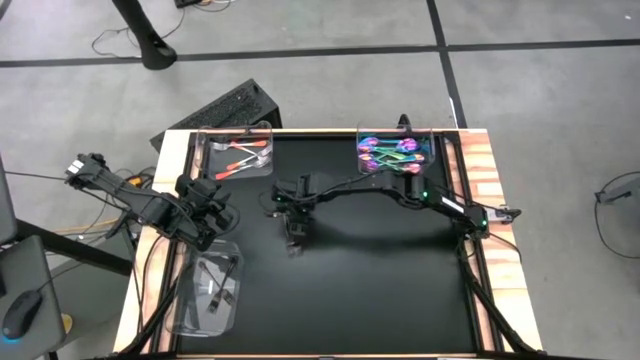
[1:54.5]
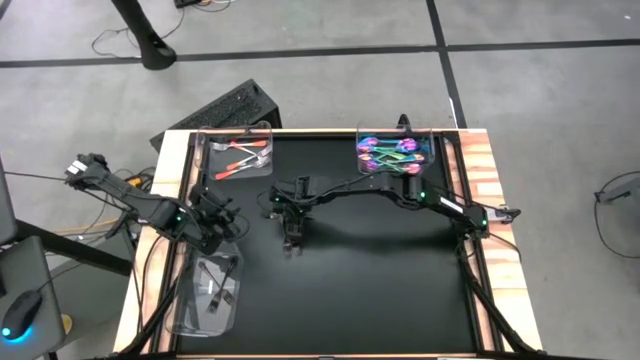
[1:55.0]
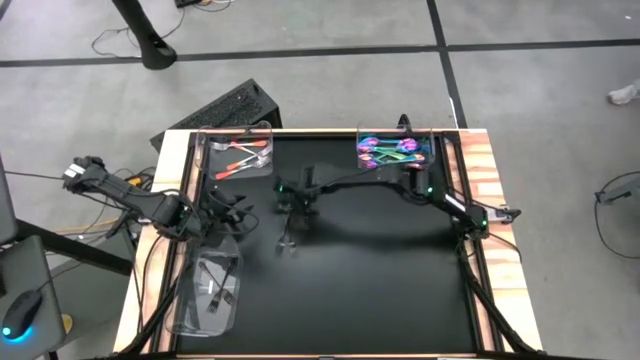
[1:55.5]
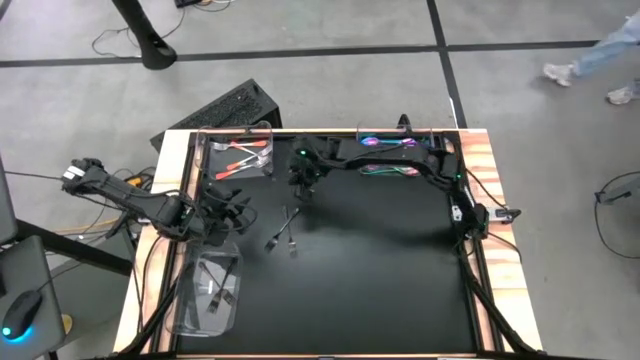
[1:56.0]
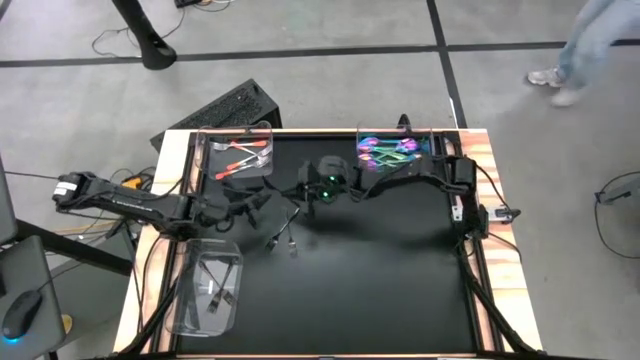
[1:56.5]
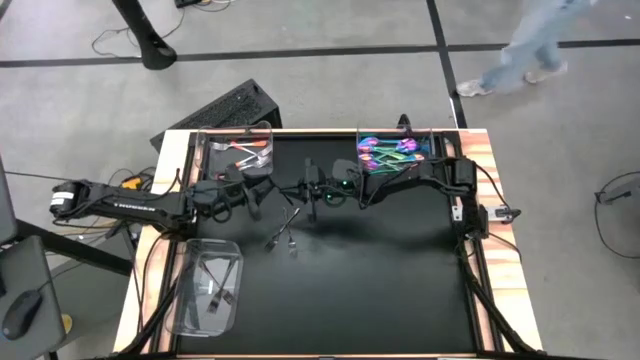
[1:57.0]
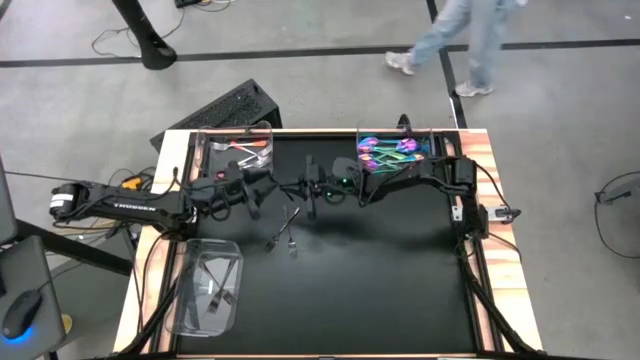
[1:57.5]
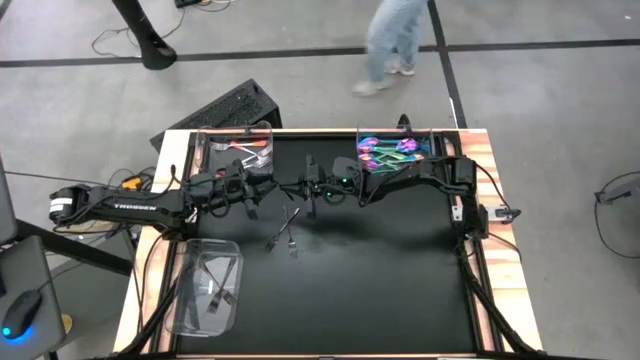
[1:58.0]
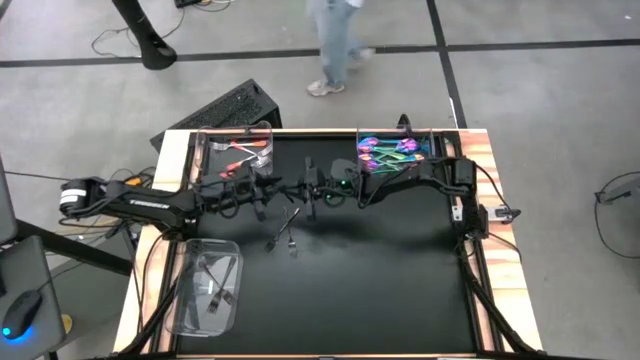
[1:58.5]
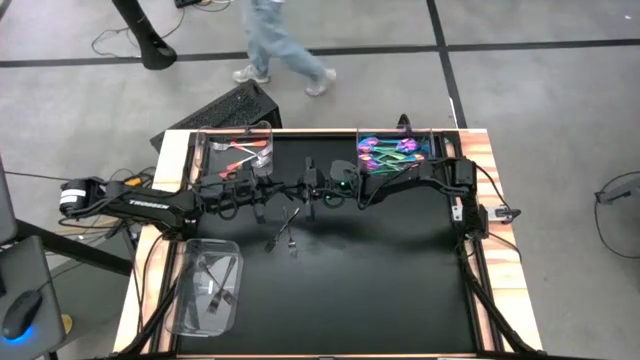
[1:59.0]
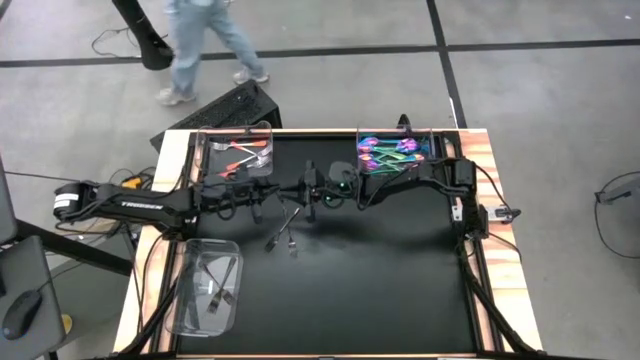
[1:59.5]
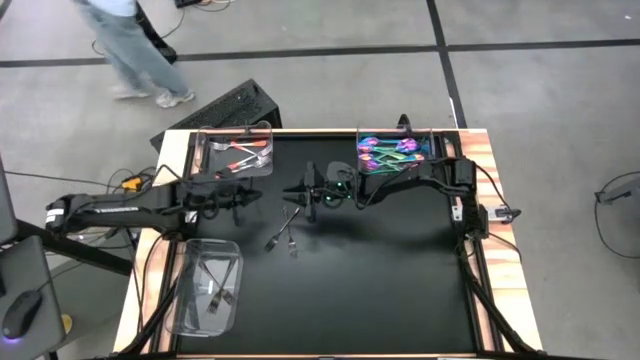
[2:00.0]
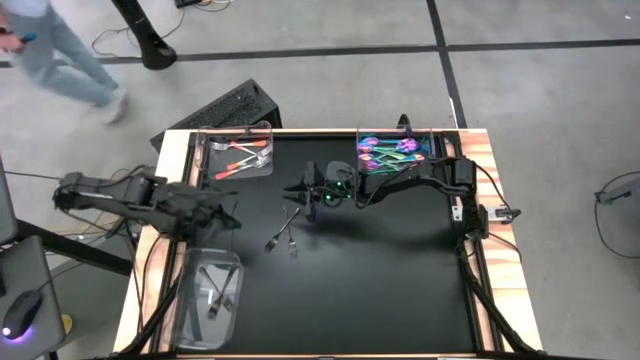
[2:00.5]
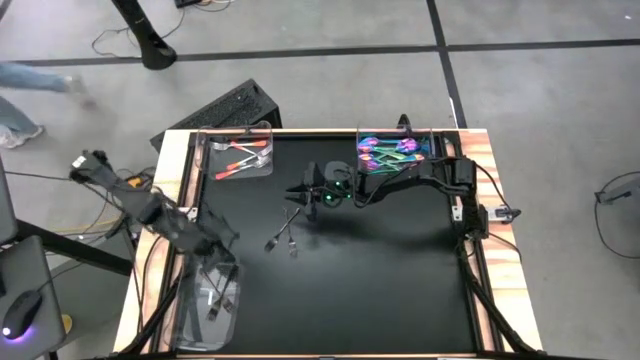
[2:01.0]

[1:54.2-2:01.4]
Task: Sort silverware by color (type)
Put the black fork into bottom transparent bin

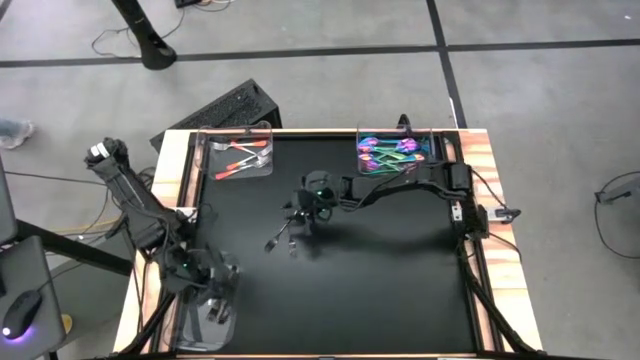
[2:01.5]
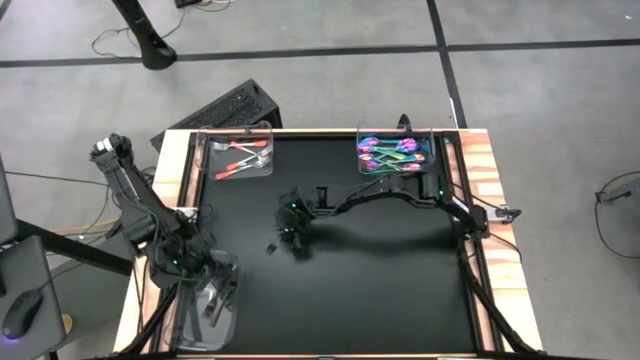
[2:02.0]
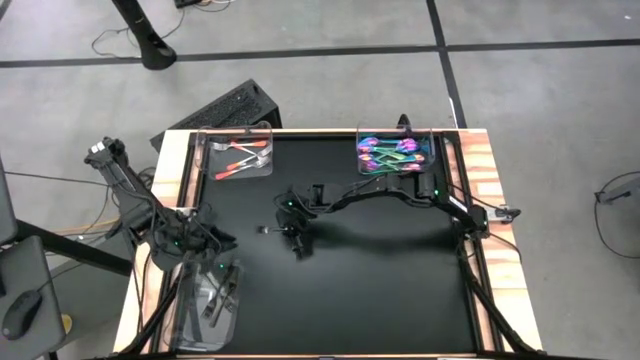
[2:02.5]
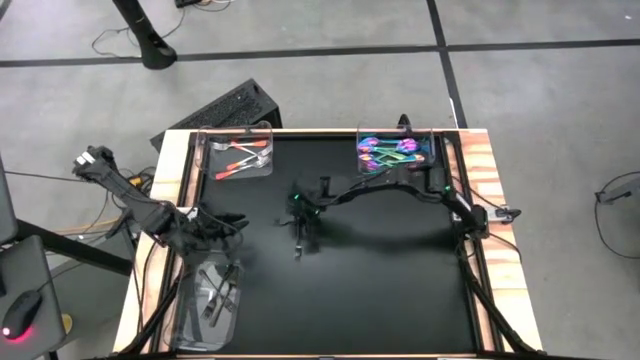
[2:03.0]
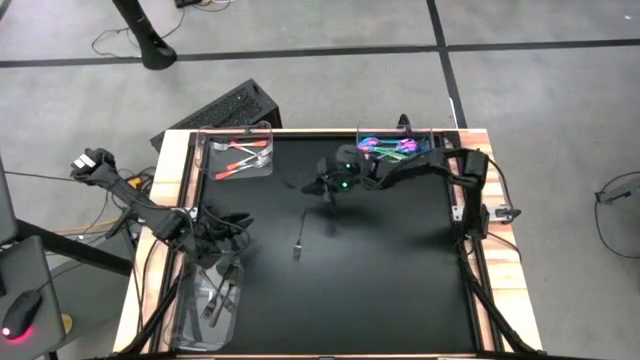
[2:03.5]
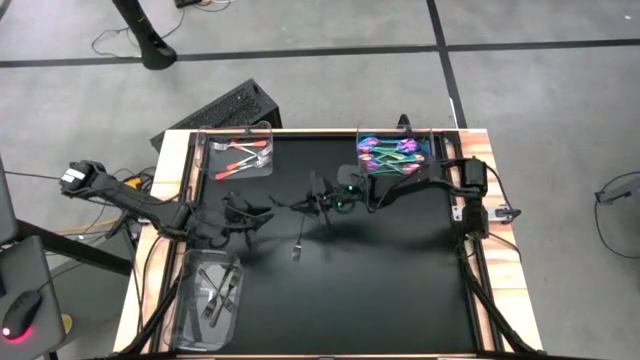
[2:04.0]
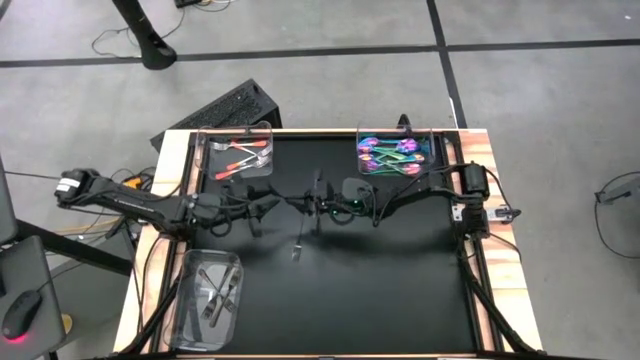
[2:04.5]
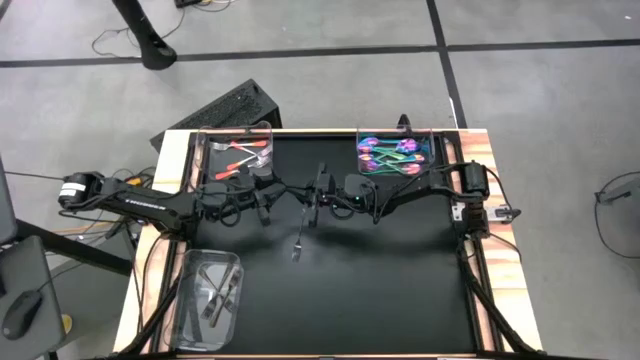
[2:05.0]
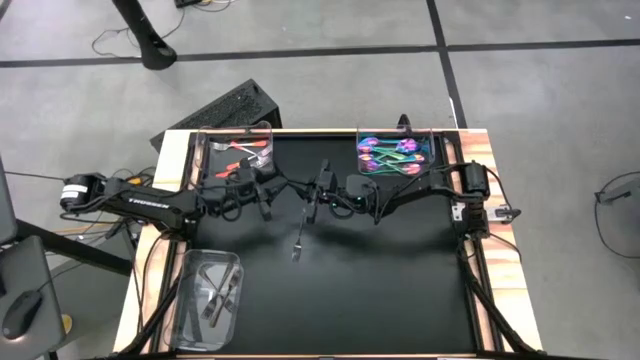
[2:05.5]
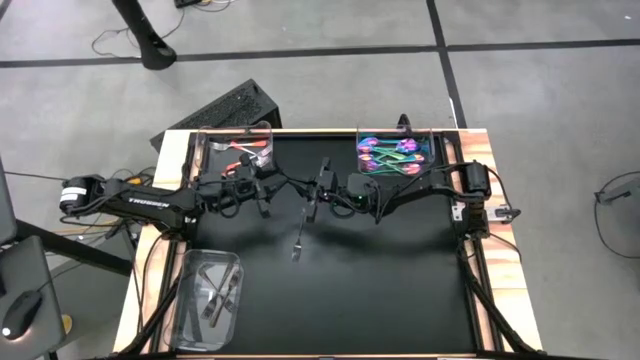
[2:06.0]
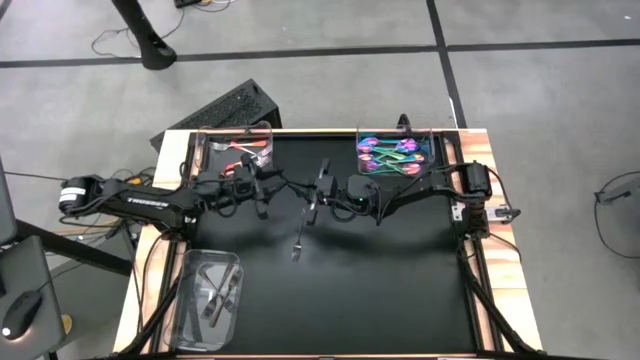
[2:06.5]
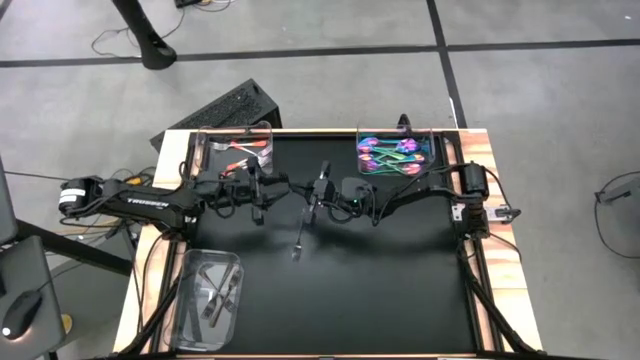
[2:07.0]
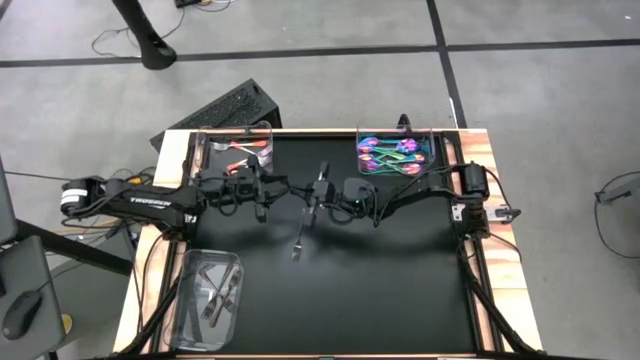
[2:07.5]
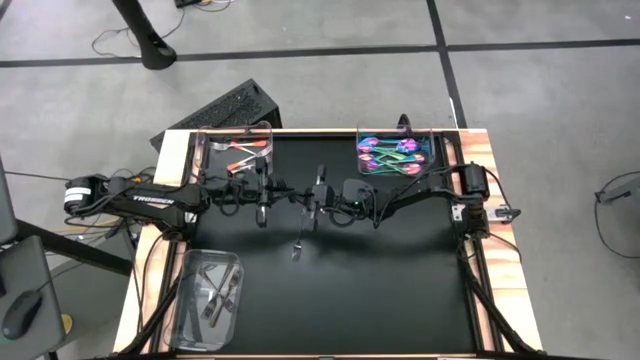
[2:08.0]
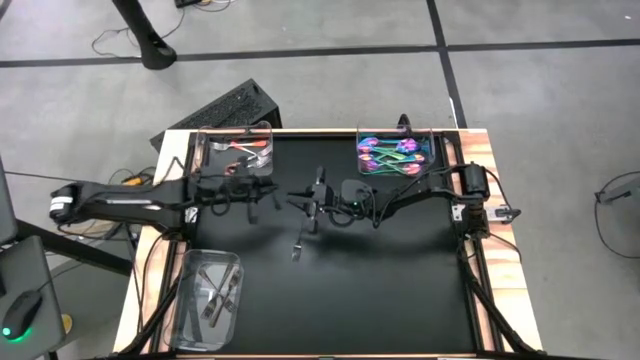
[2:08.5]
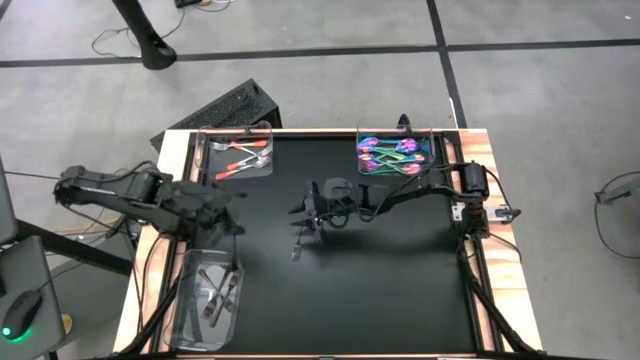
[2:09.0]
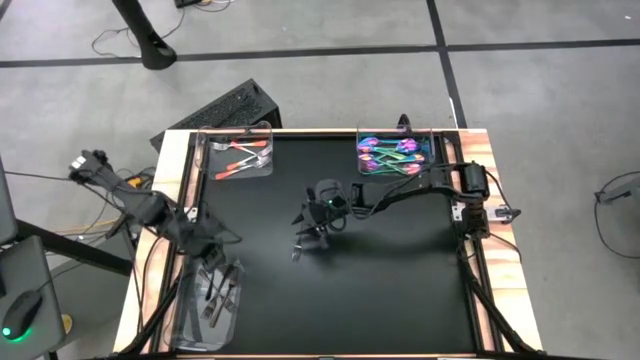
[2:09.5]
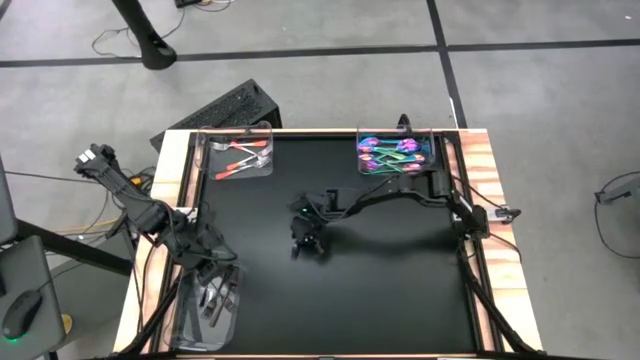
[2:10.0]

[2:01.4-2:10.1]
Put the black fork into bottom transparent bin

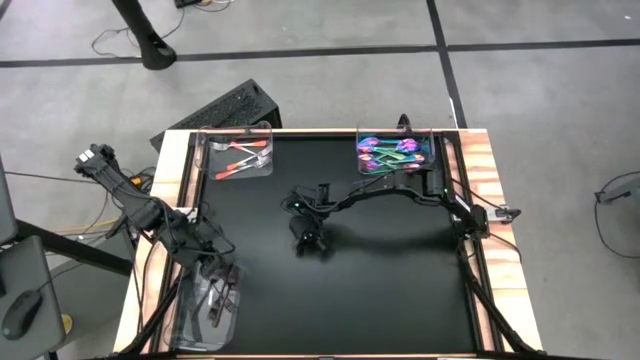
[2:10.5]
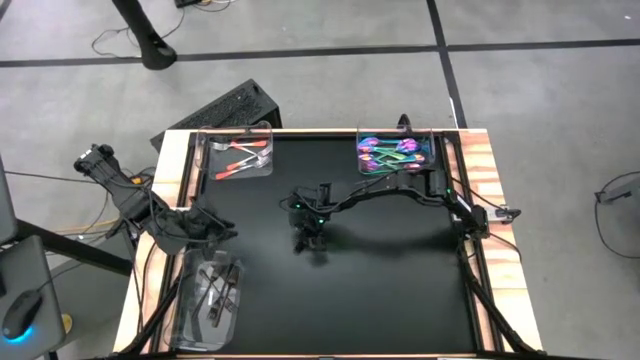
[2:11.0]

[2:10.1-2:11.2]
Put the black fork into bottom transparent bin

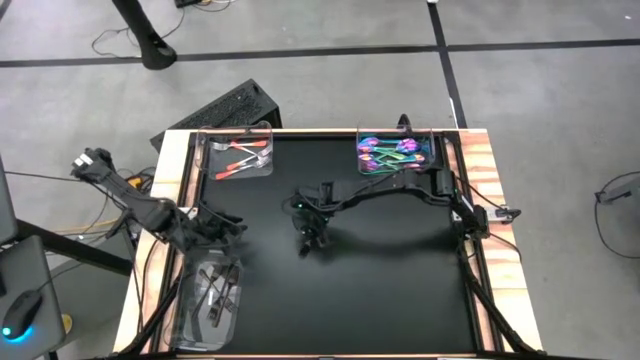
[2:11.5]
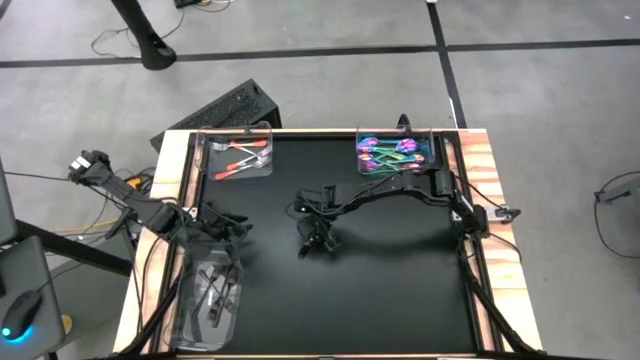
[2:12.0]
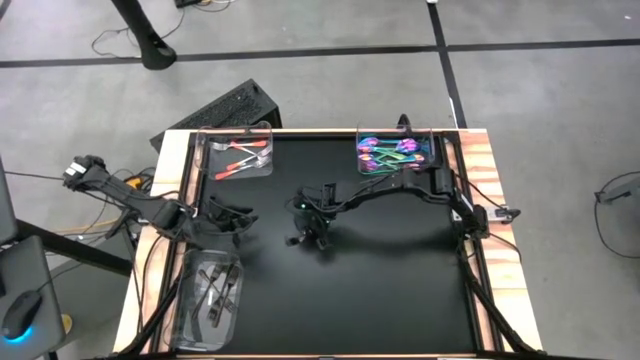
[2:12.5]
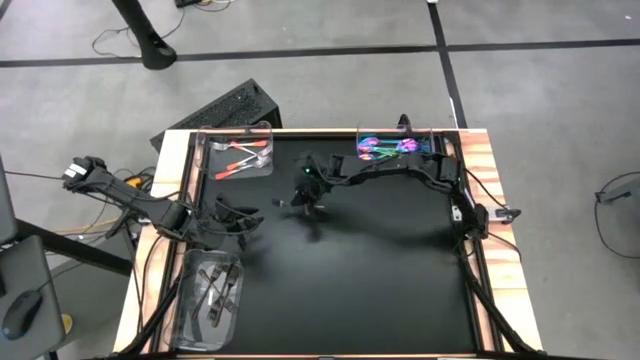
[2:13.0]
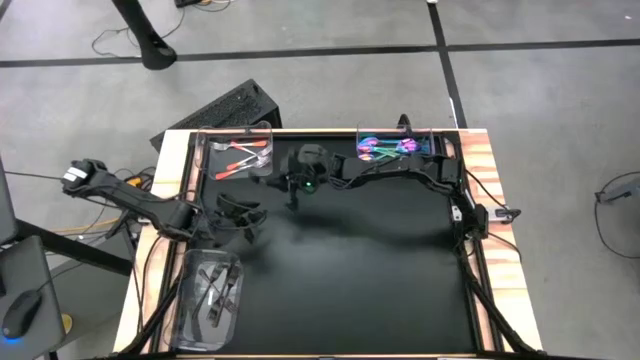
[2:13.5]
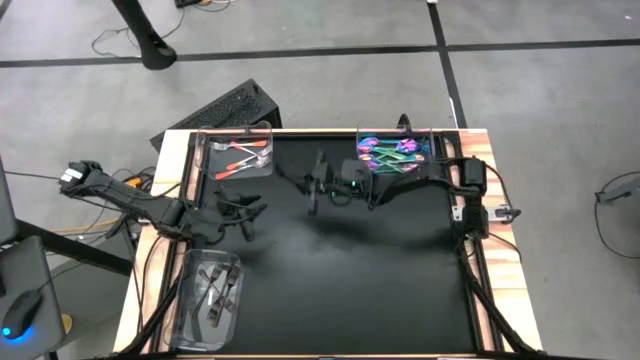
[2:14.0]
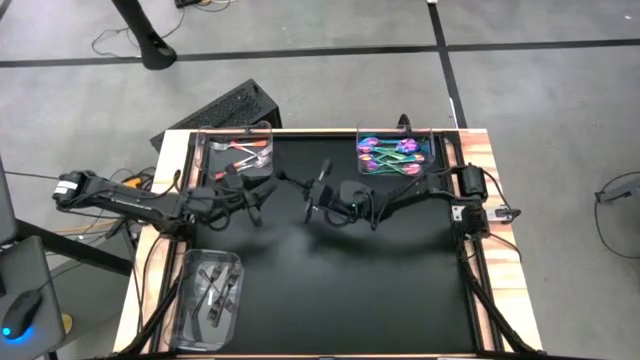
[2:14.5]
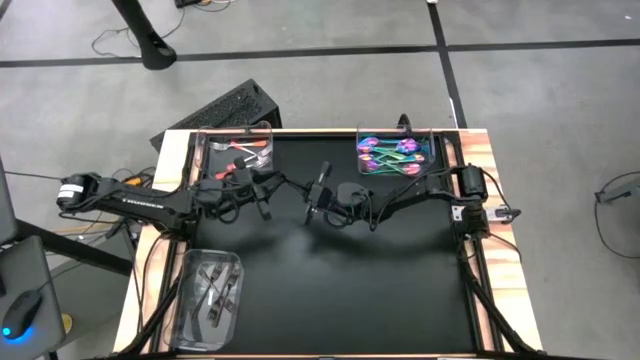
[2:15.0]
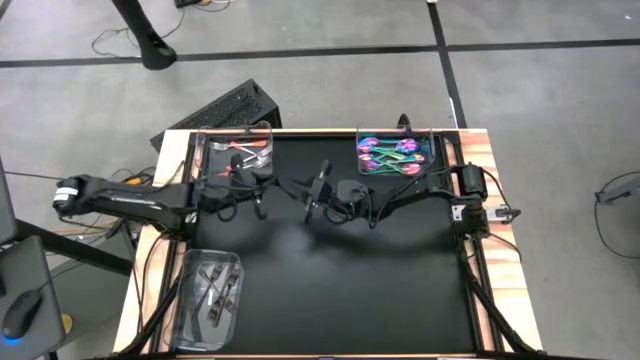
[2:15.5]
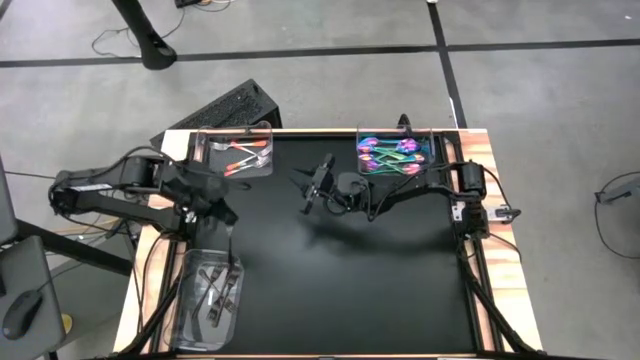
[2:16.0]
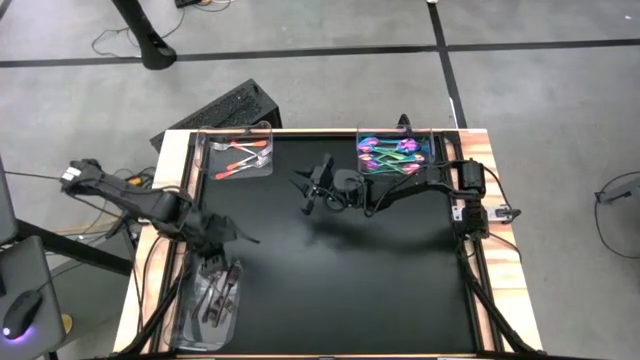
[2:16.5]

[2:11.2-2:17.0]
Put the black fork into bottom transparent bin
